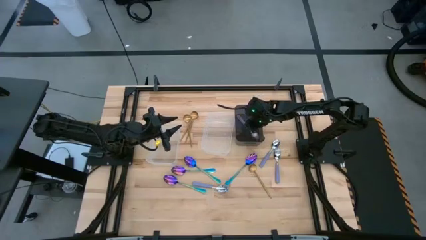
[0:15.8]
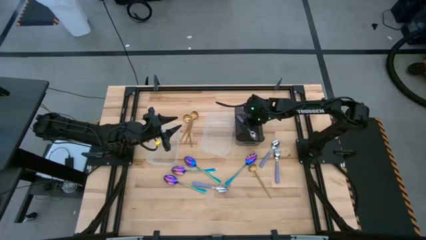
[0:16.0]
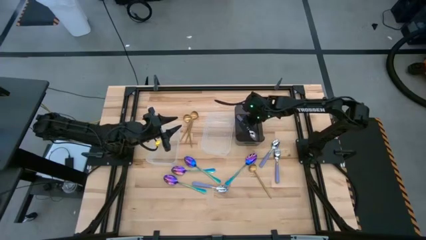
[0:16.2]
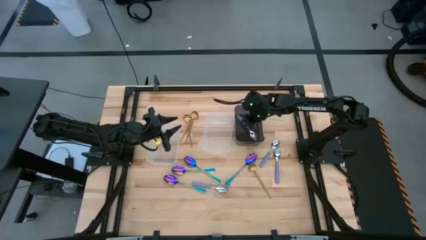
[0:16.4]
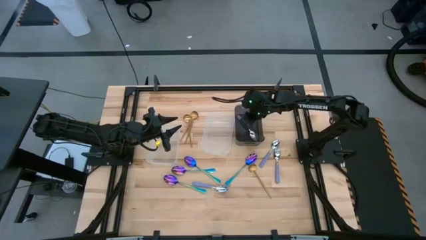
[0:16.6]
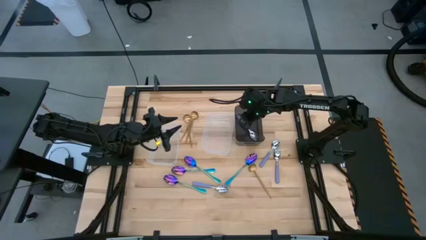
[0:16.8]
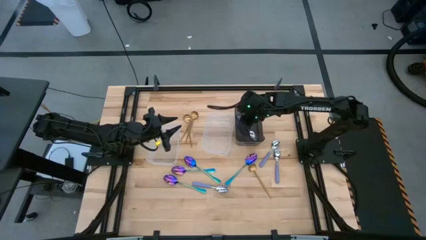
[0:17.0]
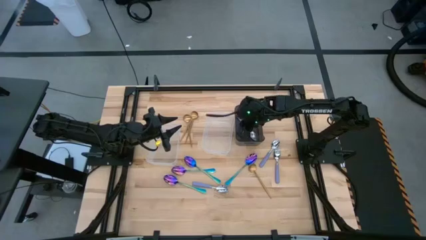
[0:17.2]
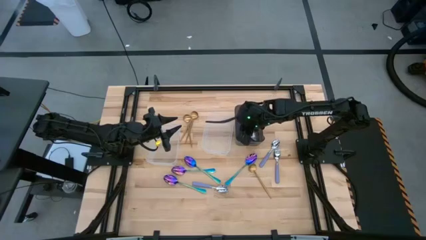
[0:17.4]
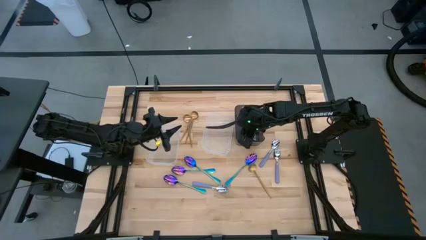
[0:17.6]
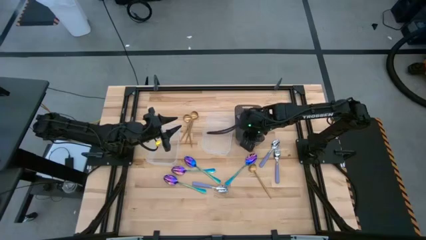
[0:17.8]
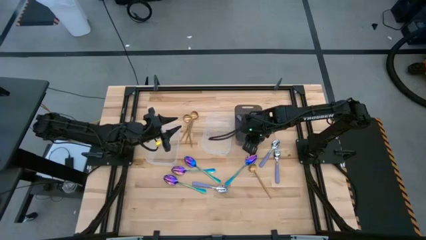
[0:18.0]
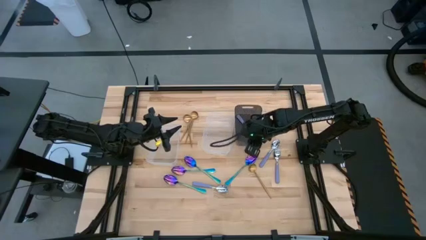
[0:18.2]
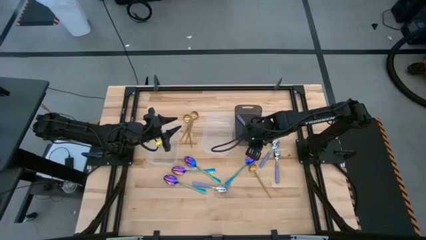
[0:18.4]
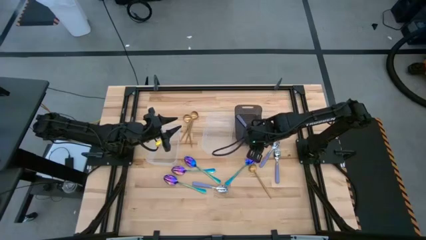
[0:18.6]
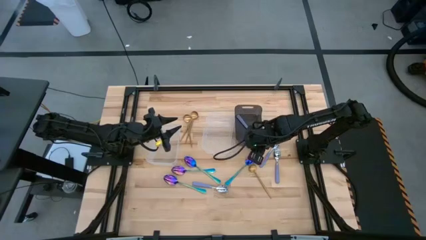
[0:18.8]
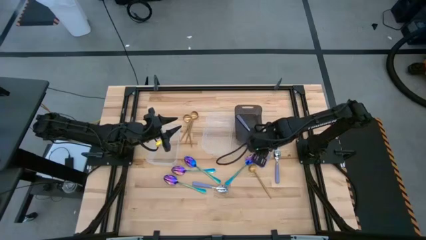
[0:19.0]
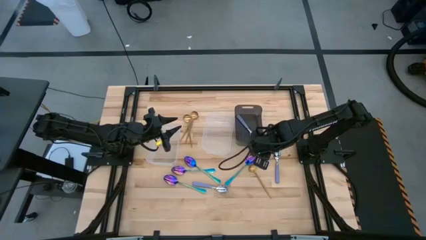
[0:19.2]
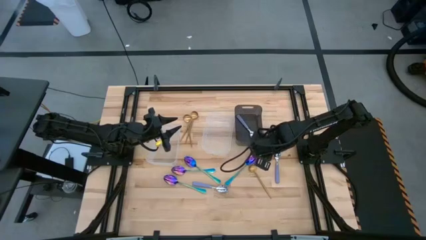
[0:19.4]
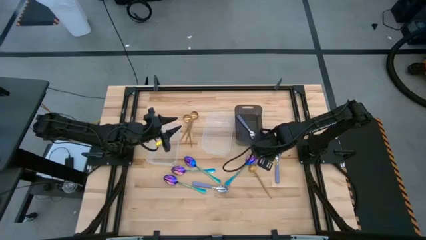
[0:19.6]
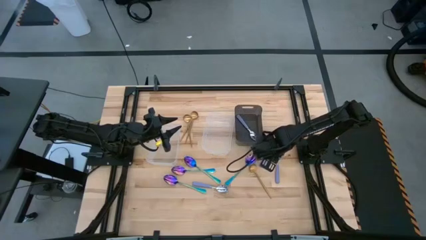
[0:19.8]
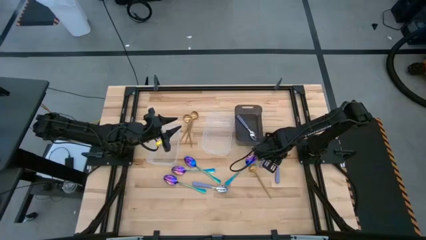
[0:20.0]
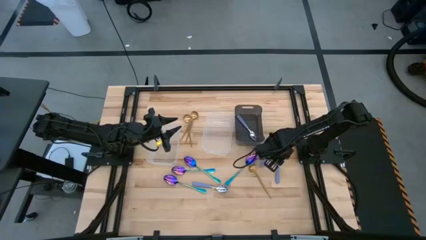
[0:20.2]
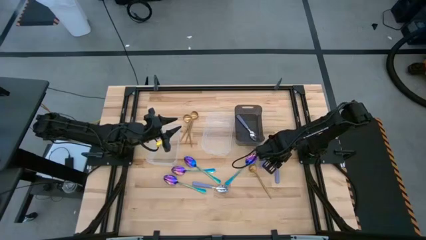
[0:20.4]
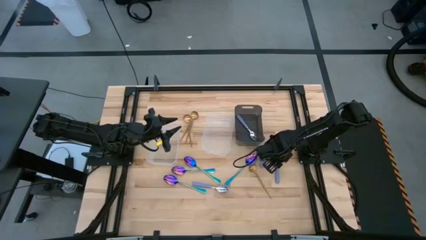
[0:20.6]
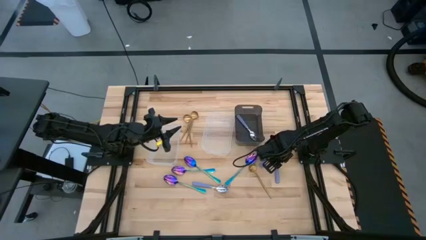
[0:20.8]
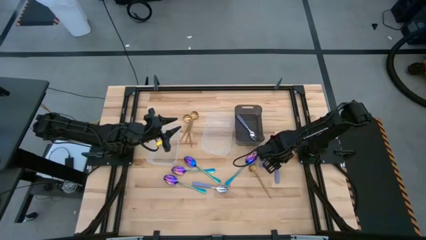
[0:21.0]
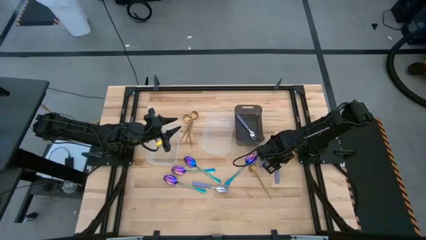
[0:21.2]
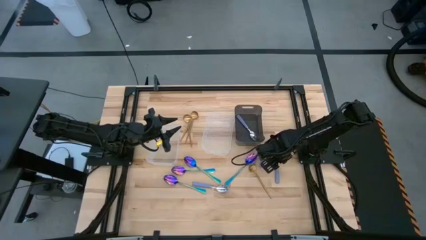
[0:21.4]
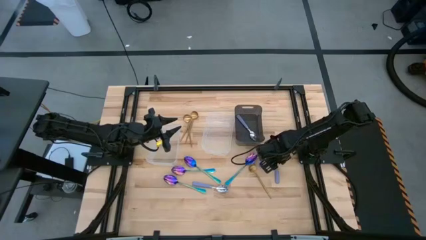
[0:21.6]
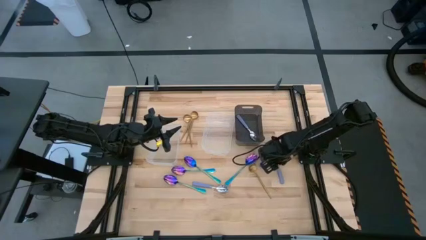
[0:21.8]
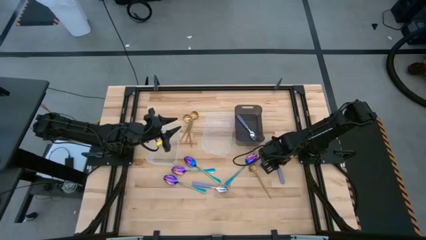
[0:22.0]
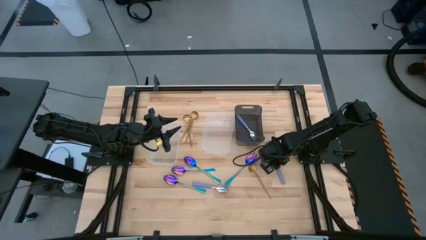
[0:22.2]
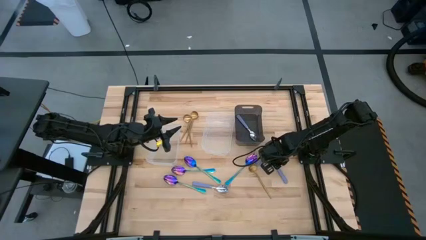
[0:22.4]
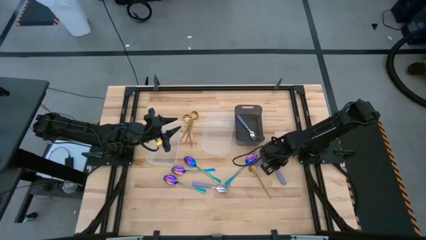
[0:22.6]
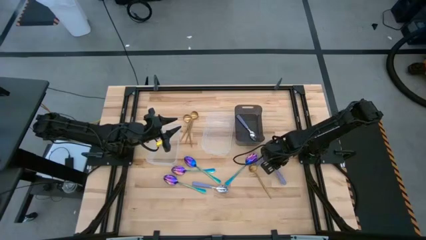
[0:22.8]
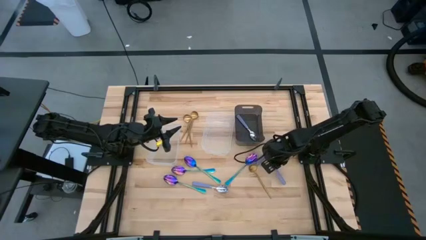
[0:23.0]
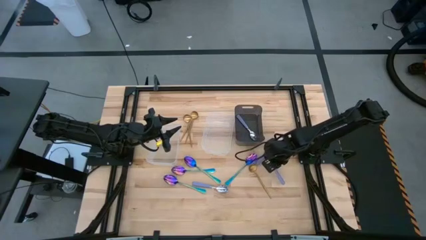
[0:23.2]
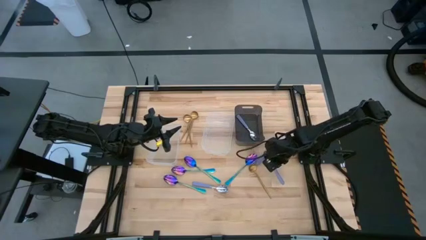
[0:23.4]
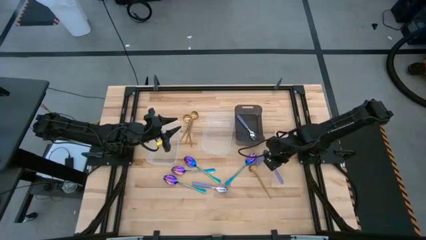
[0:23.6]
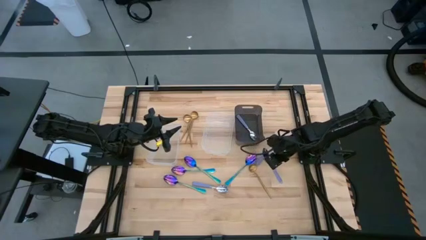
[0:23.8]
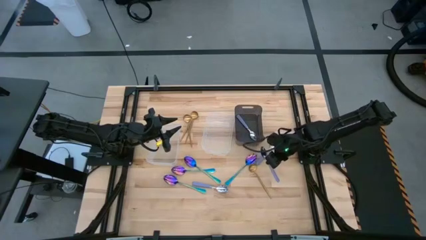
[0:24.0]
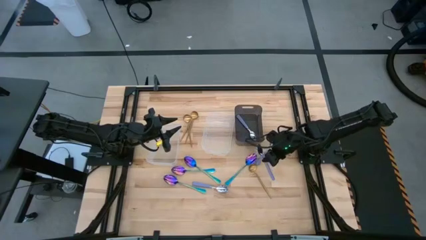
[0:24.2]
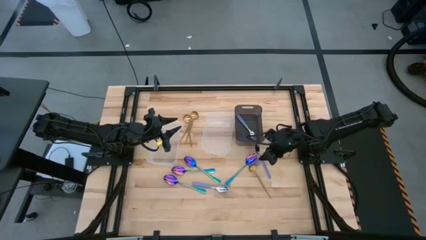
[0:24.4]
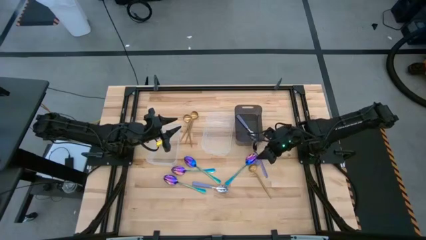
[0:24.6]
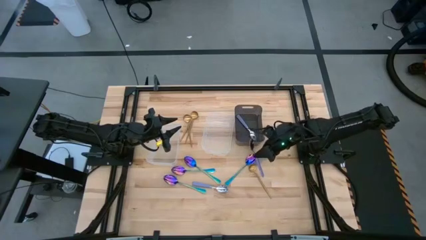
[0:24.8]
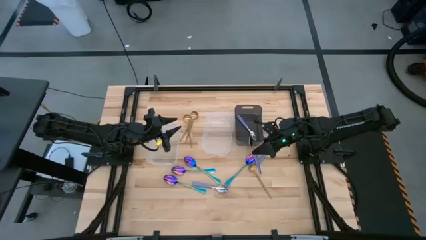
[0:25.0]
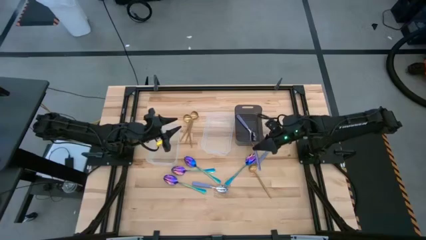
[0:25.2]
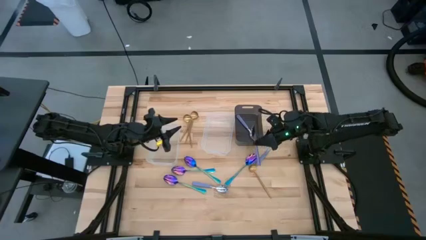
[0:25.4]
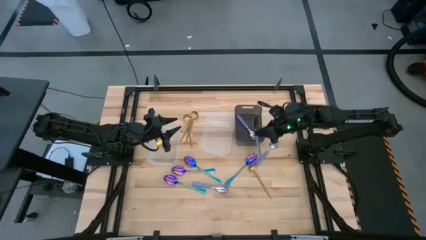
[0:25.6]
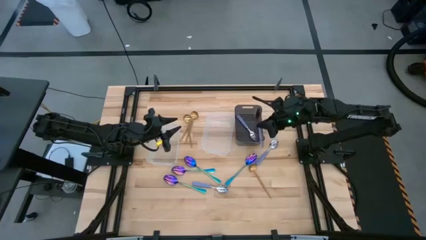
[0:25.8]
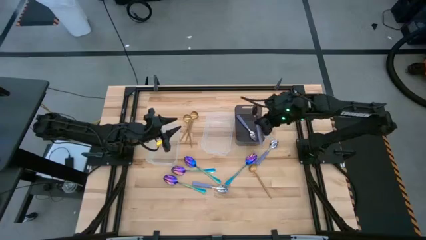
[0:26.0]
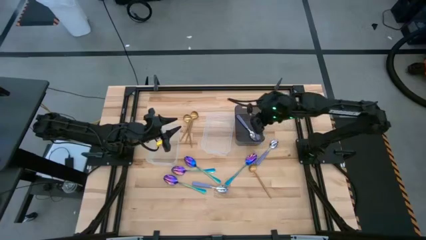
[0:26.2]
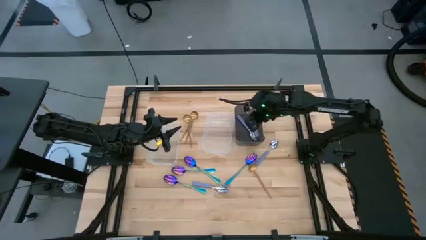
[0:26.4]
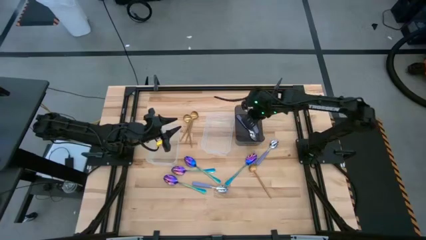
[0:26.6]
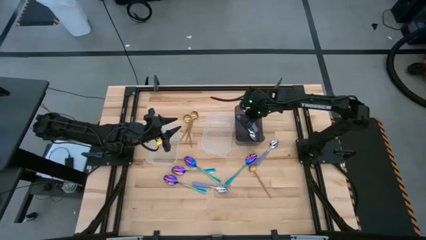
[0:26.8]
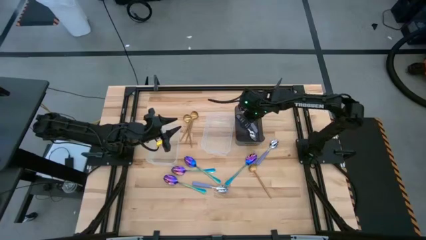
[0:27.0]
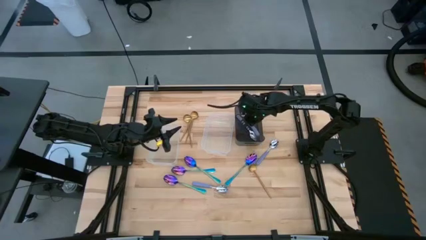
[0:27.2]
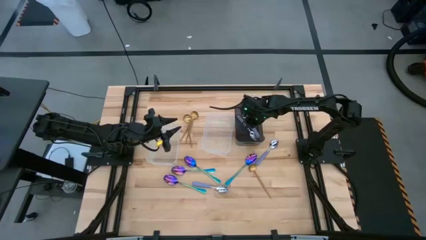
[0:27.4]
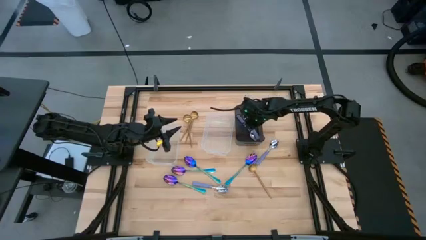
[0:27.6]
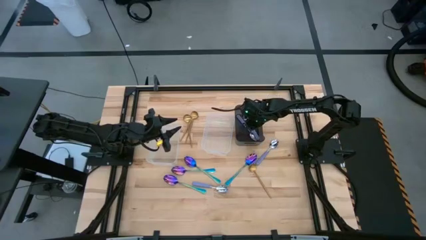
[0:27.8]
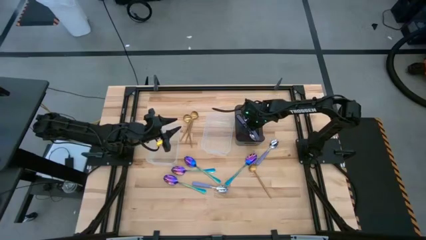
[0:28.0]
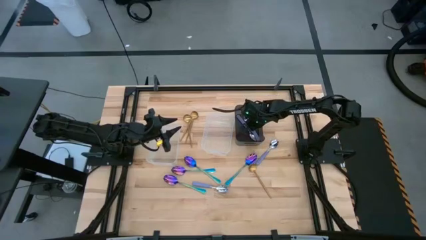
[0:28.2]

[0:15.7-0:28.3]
Task: Sort silverware by color (type)
Put the purple spoon into the black bin

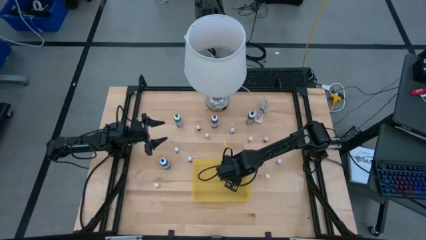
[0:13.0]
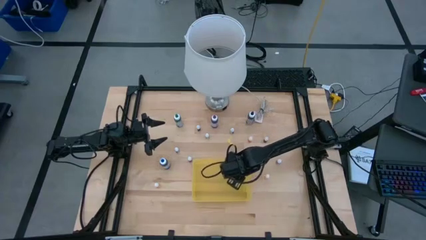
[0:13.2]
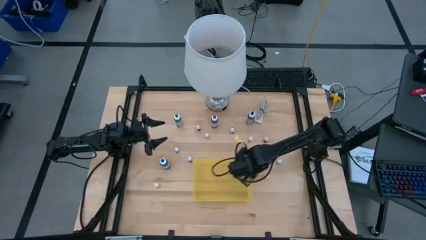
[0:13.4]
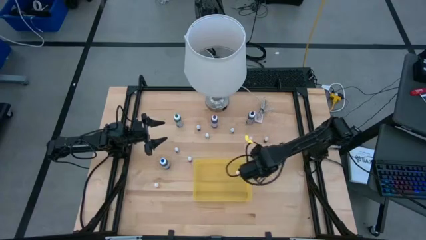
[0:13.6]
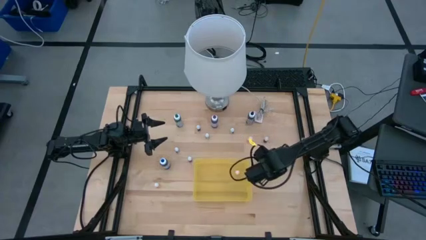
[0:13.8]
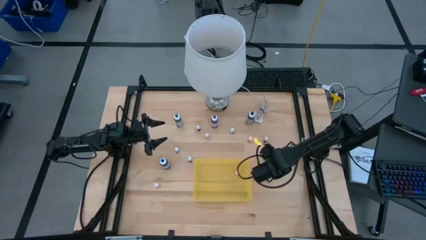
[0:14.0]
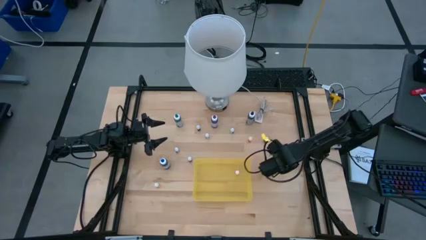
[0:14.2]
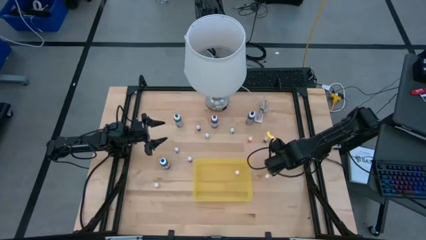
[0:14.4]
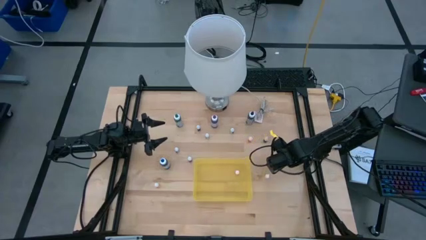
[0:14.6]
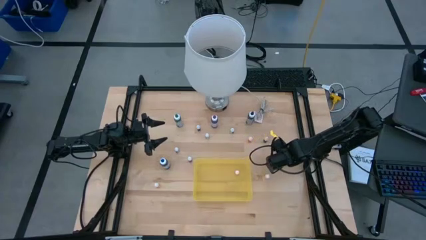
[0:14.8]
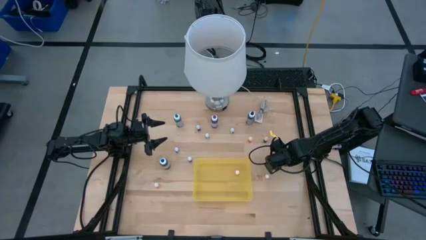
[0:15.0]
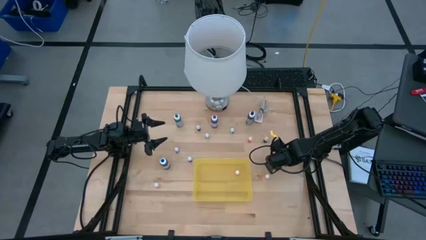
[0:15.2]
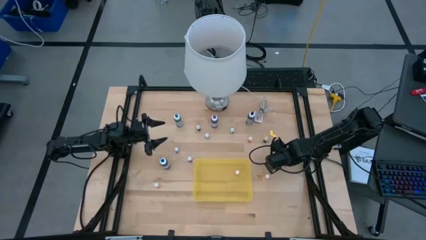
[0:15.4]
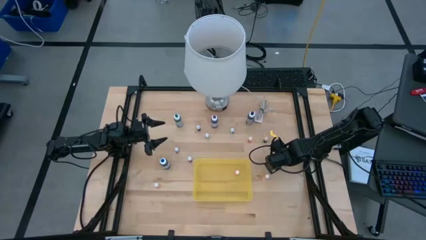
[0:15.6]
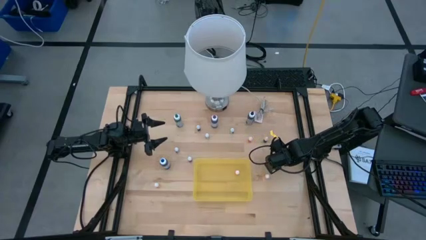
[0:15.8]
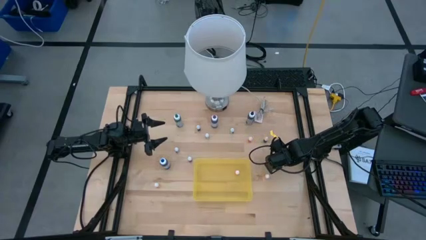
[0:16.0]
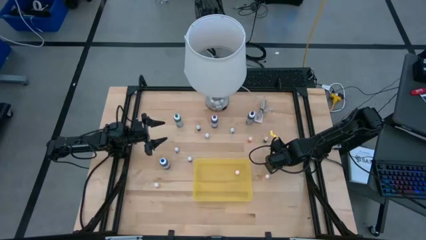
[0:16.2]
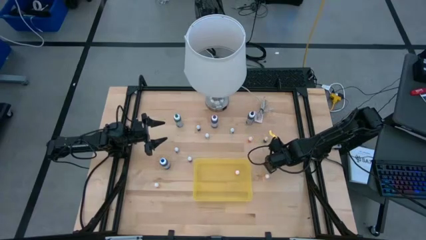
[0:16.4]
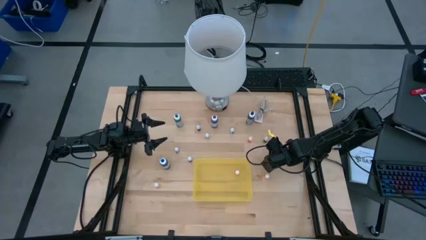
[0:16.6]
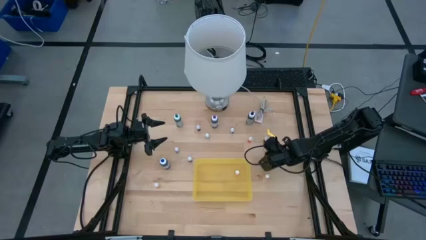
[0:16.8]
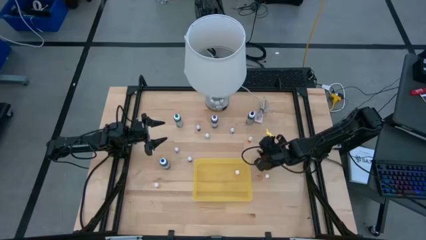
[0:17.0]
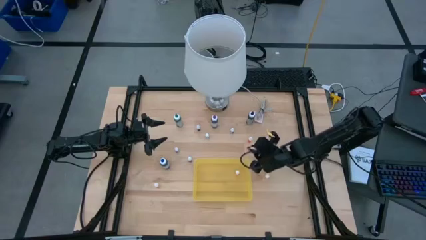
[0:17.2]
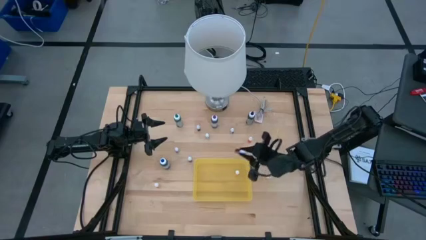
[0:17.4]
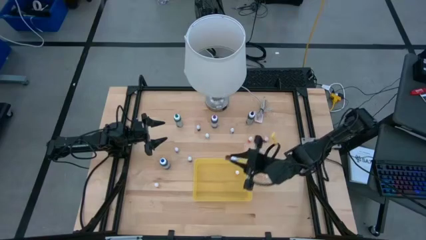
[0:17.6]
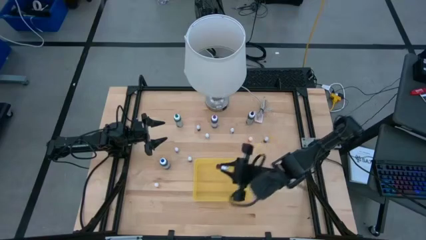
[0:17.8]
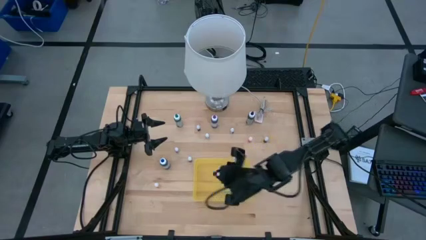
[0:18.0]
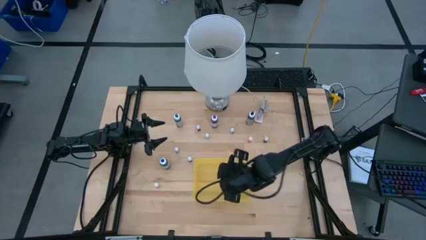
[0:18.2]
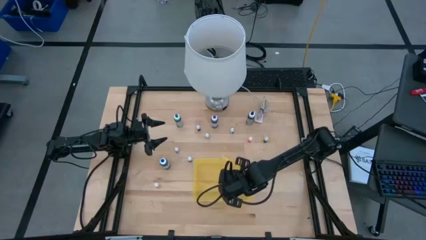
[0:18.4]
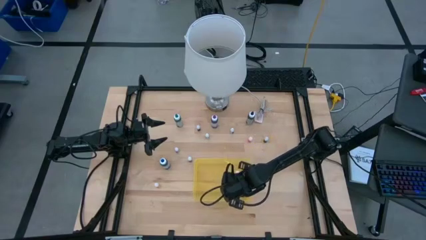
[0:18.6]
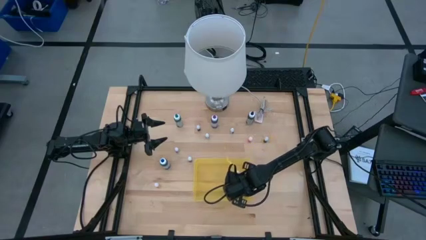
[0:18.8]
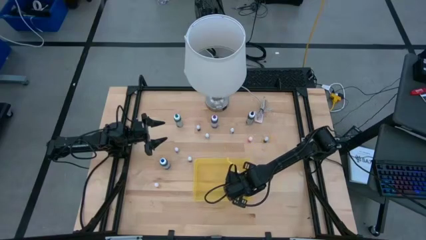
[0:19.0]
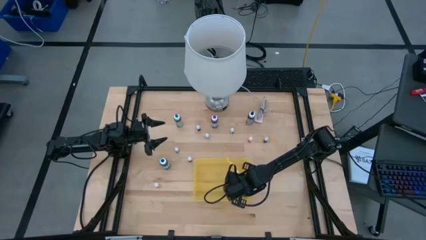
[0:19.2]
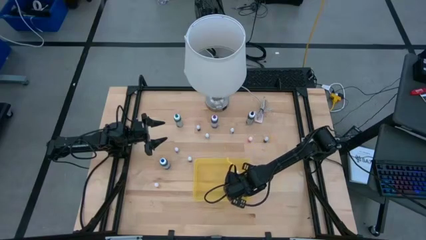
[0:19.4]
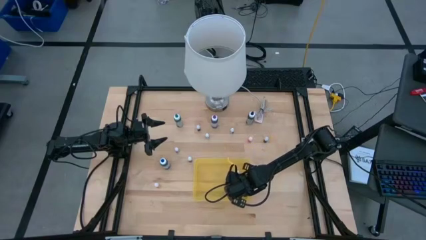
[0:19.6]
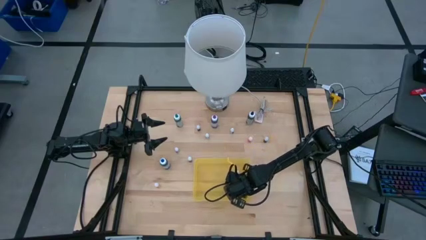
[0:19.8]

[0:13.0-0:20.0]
Task: Pick & Place food coloring
Put the right small red food coloring bottle into the transparent bin
